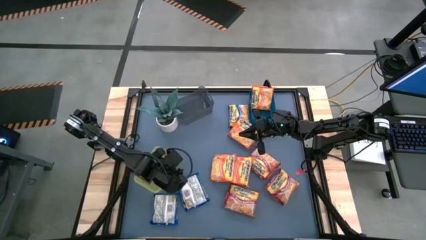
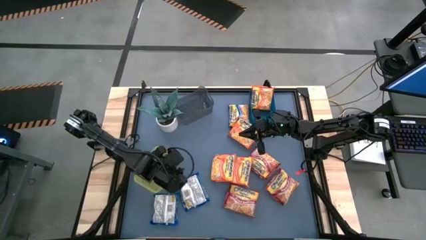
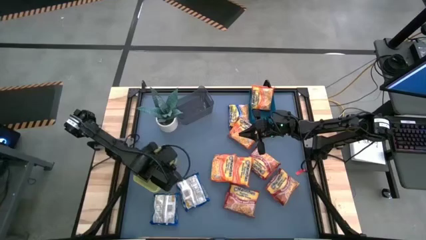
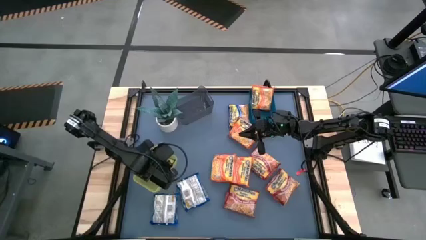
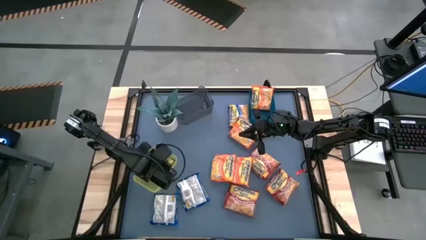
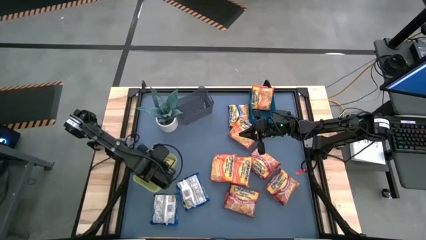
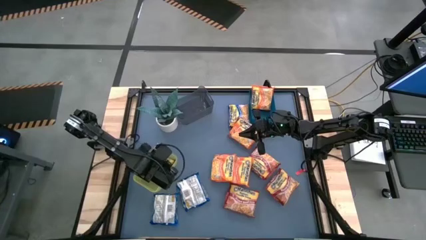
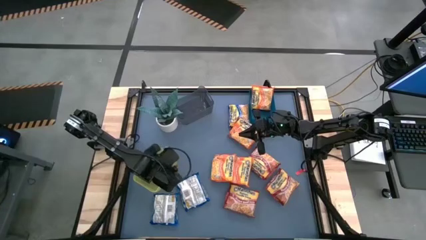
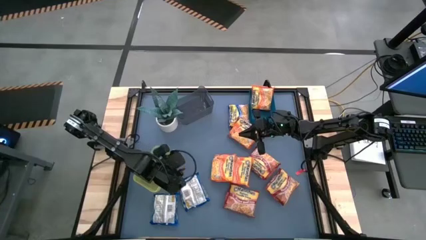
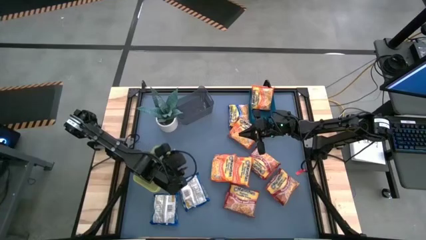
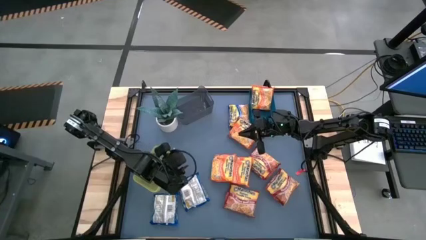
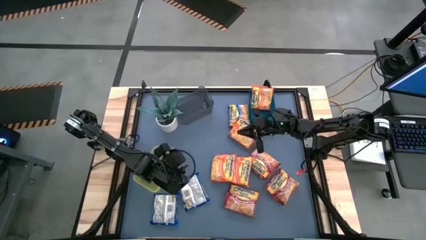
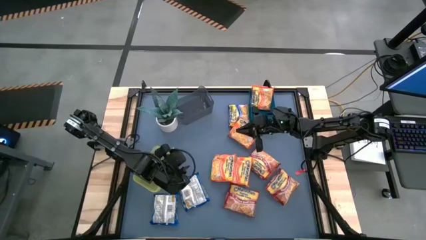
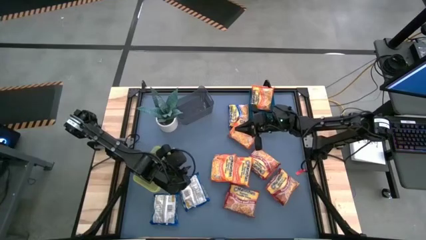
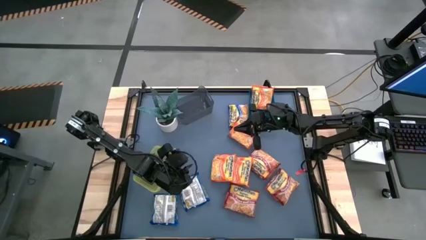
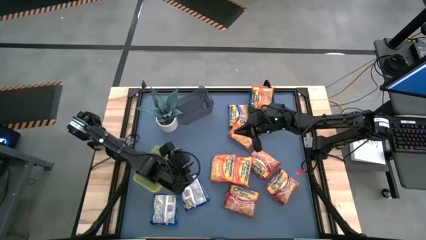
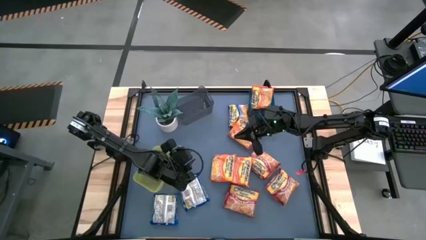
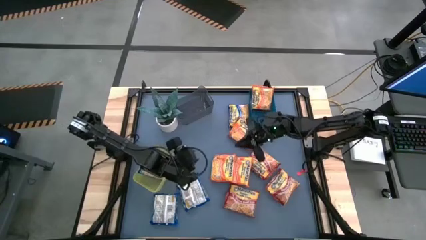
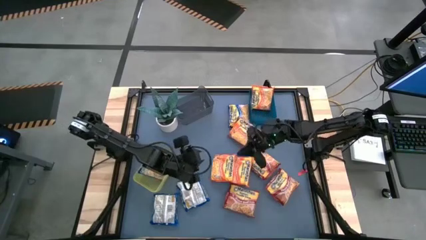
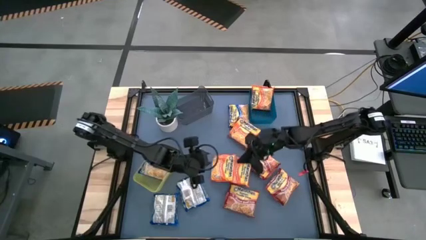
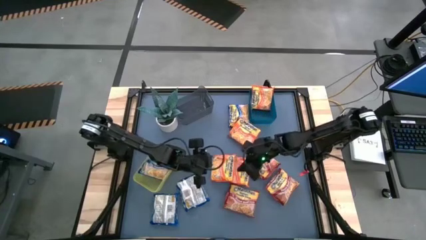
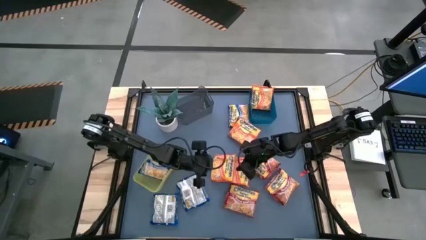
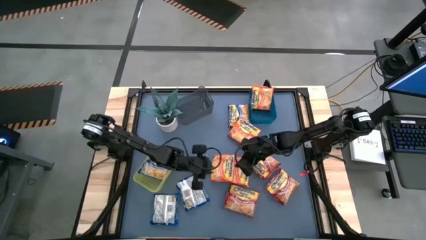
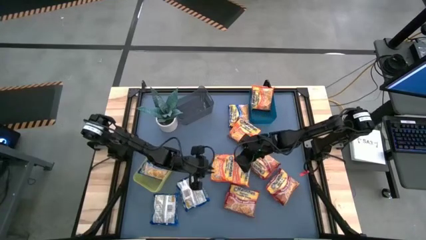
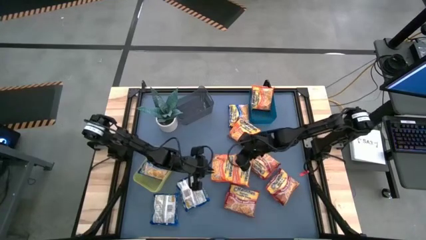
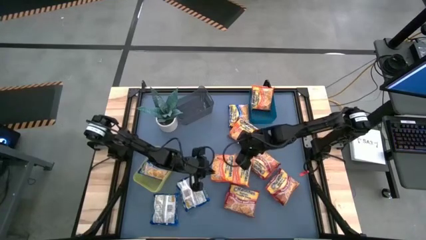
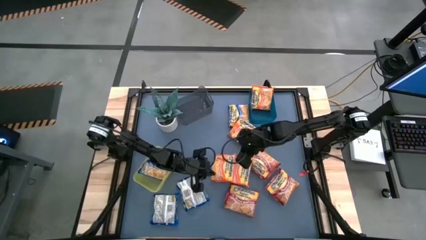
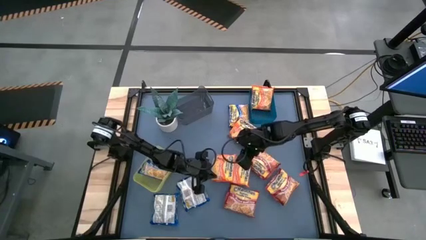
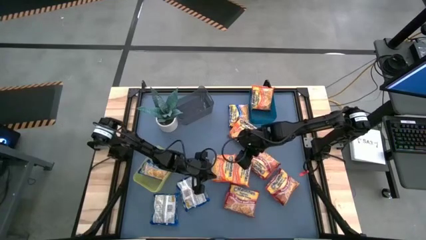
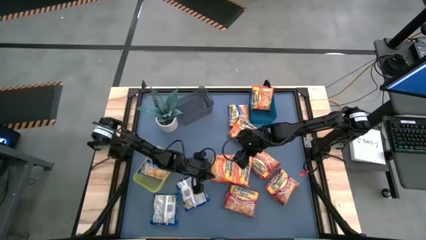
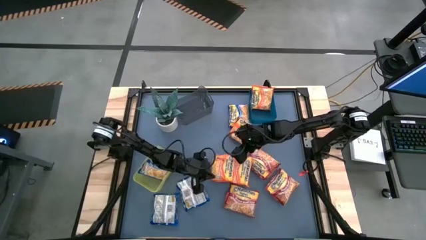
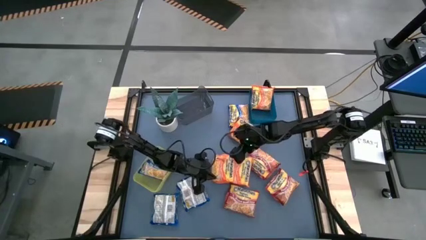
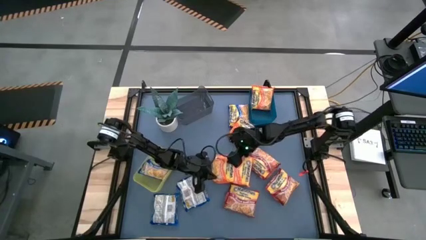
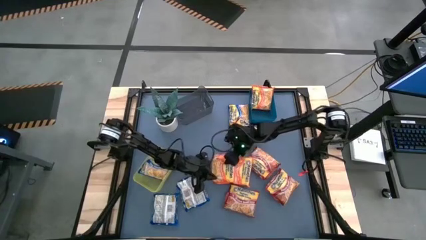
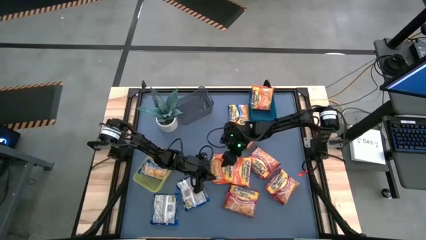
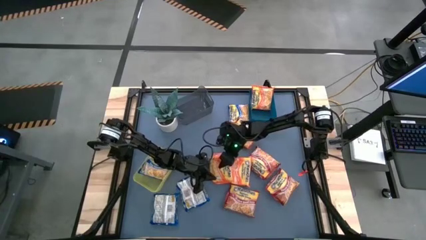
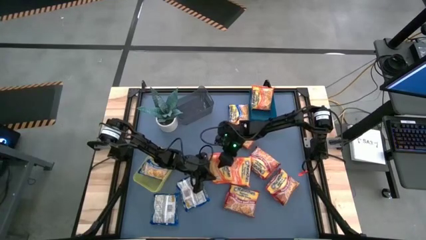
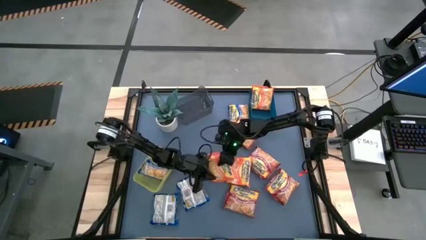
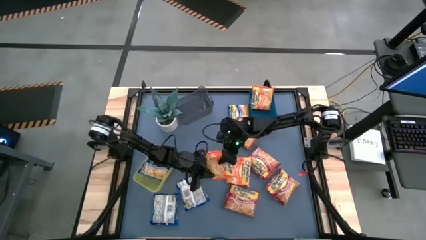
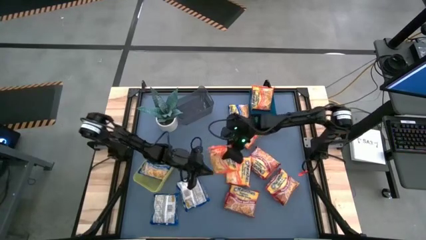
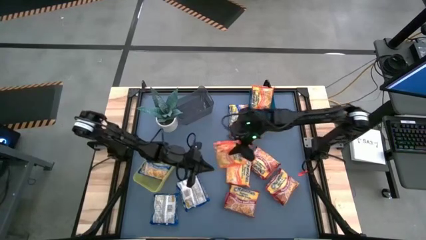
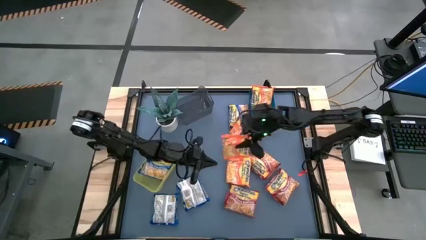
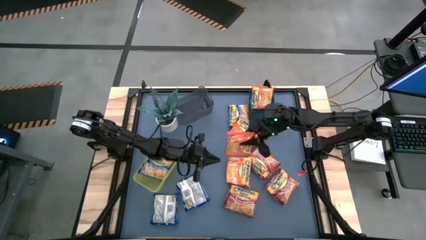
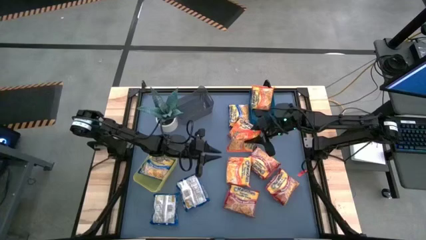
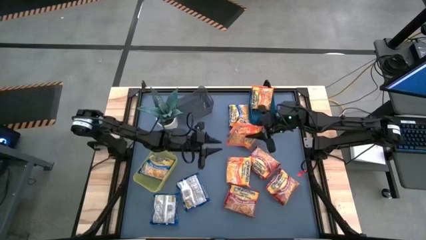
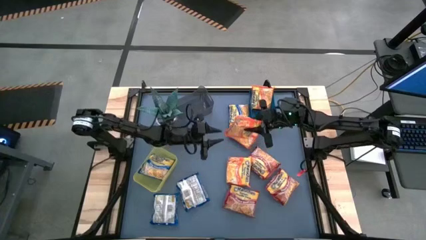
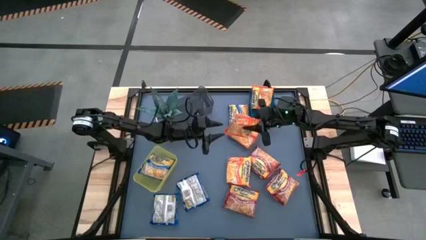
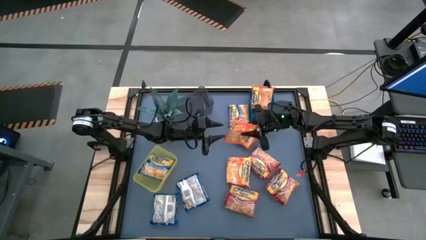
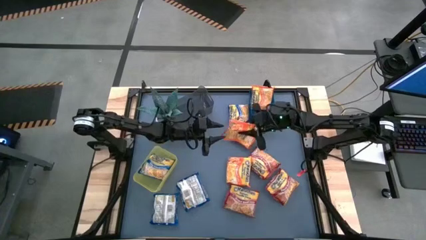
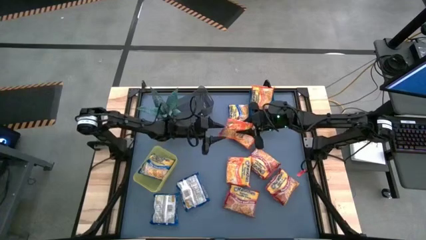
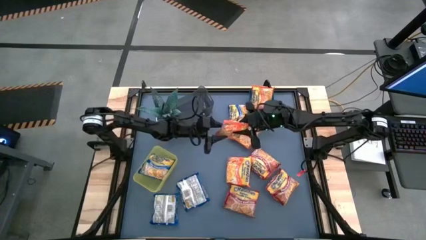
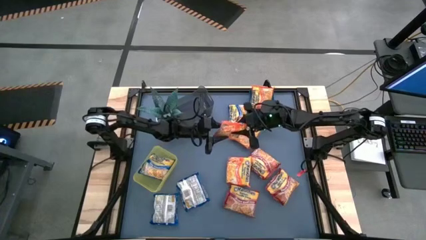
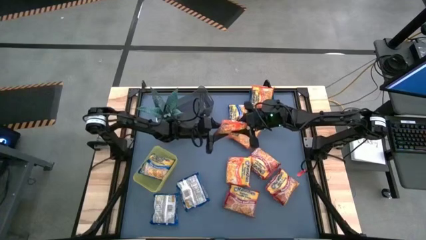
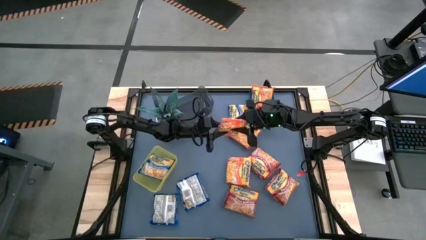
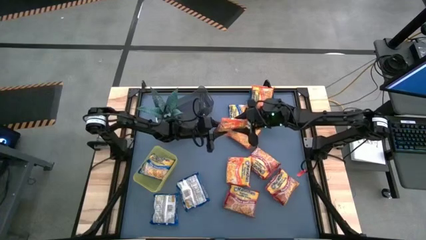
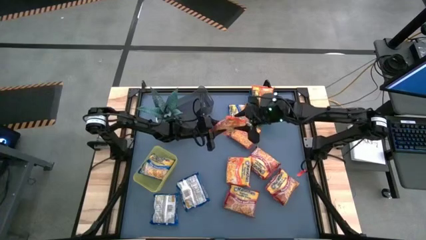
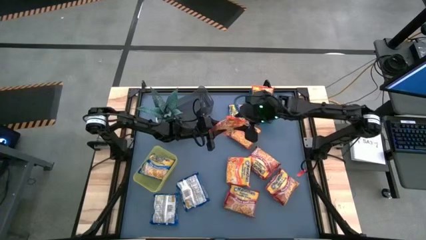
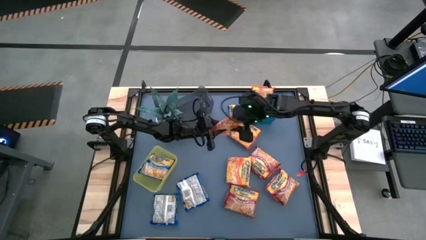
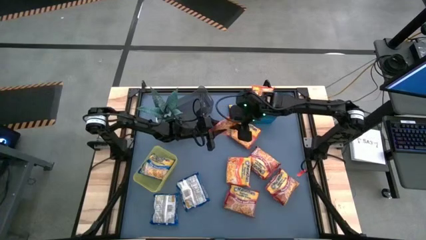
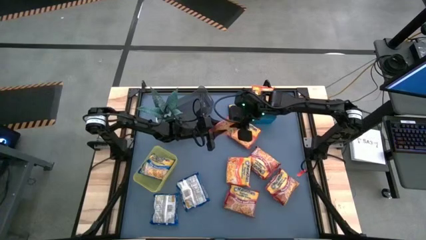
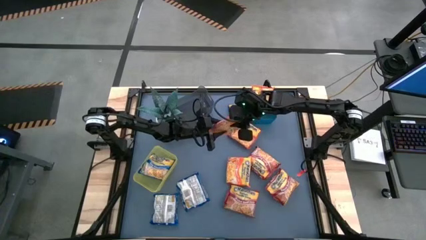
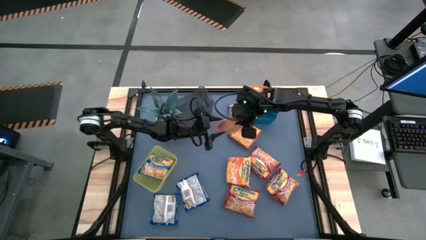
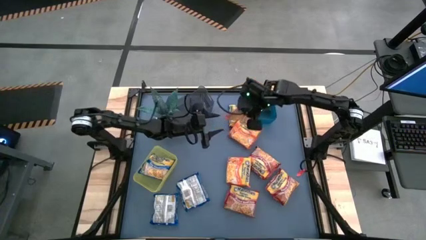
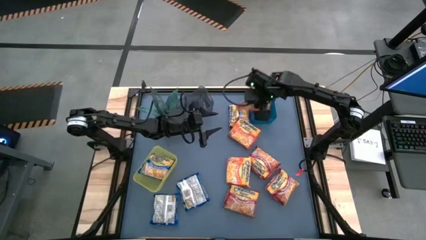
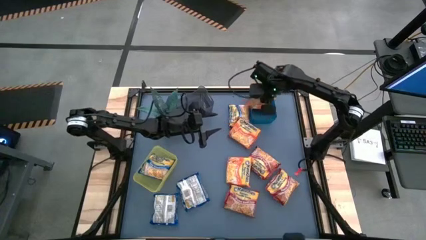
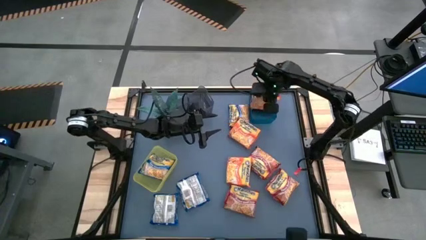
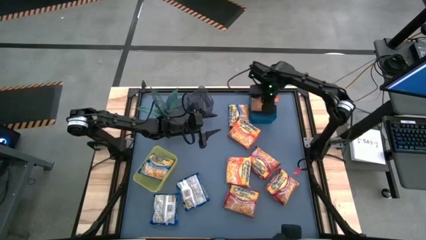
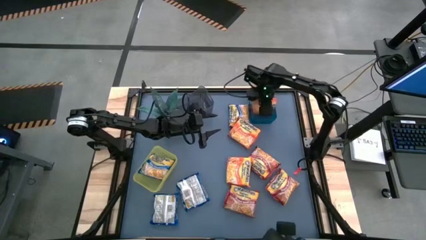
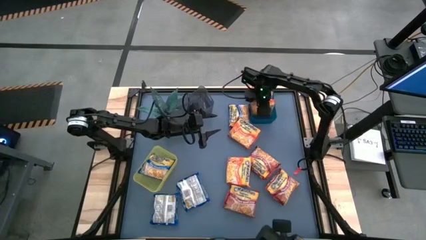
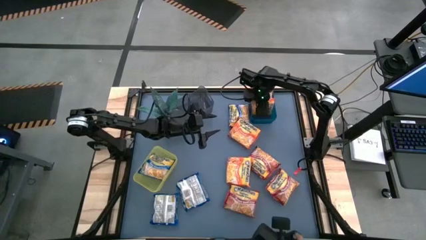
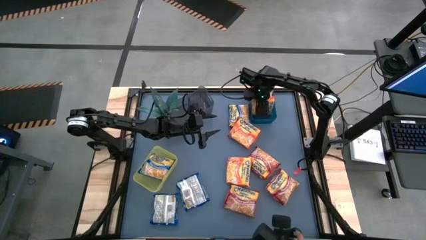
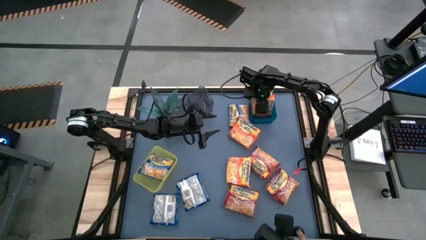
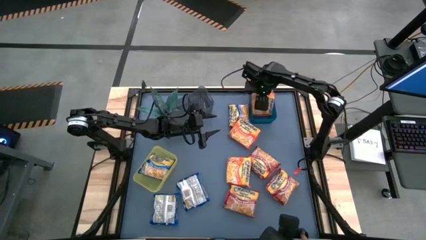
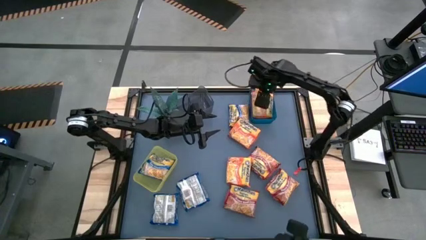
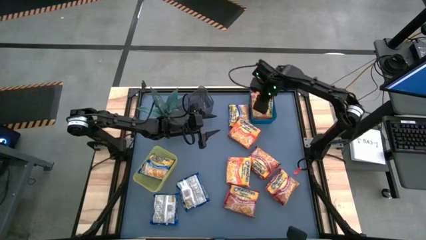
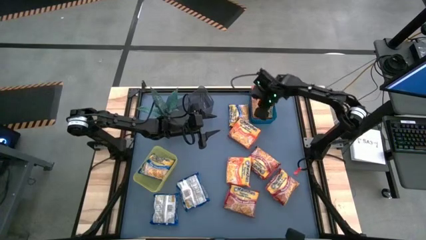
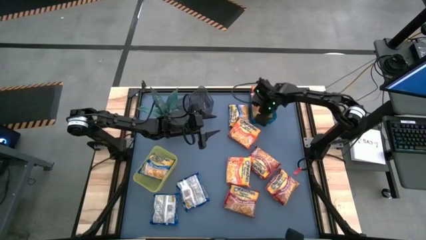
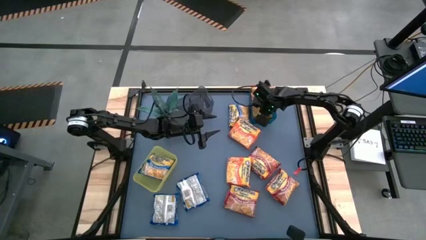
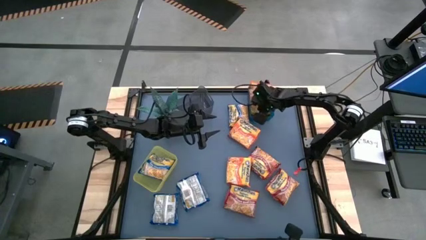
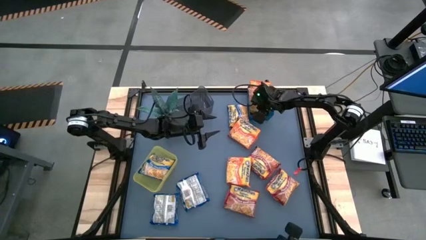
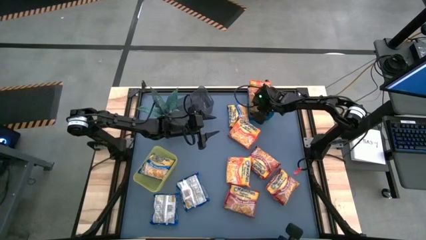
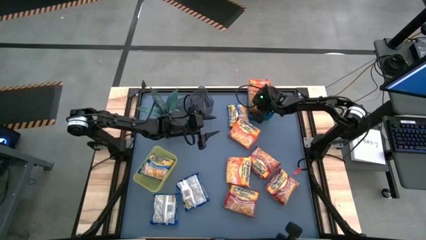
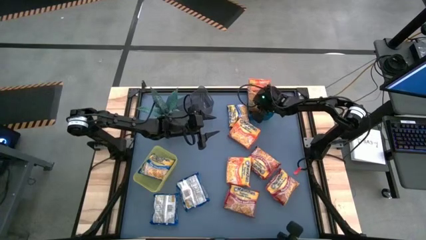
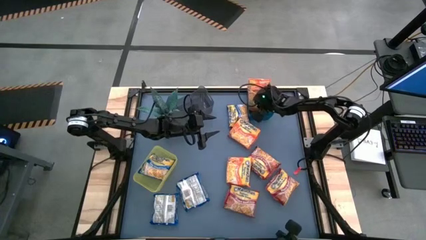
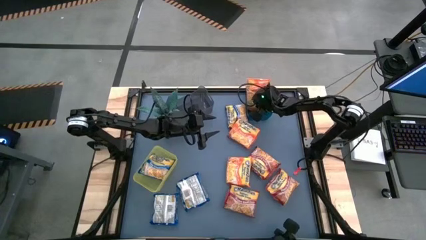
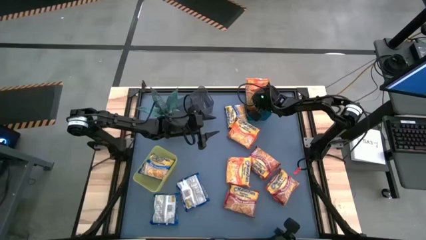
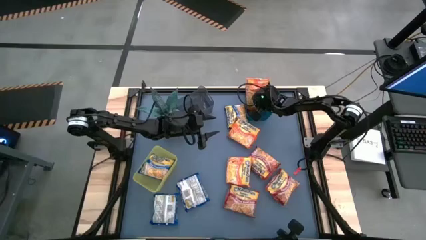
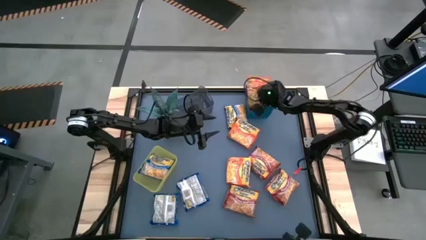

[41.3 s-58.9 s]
Task: Sort Maruchan noodles
Put the orange noodle pack into the blue bin
